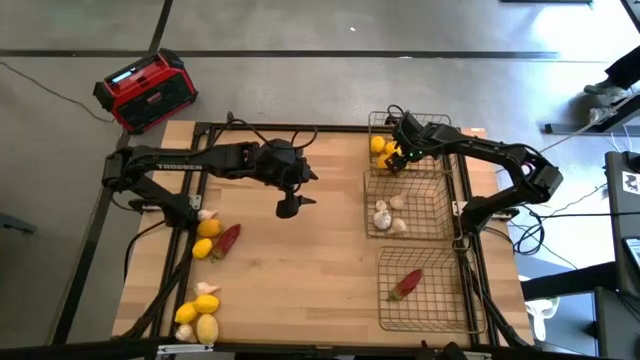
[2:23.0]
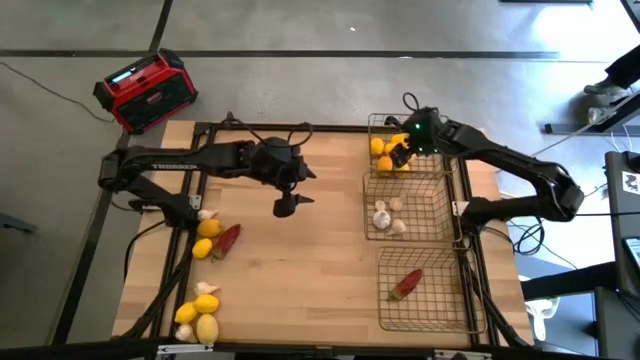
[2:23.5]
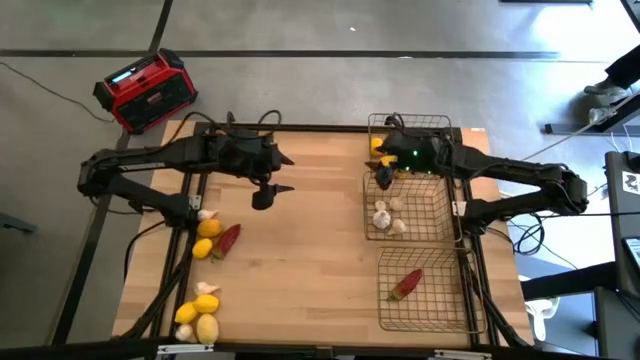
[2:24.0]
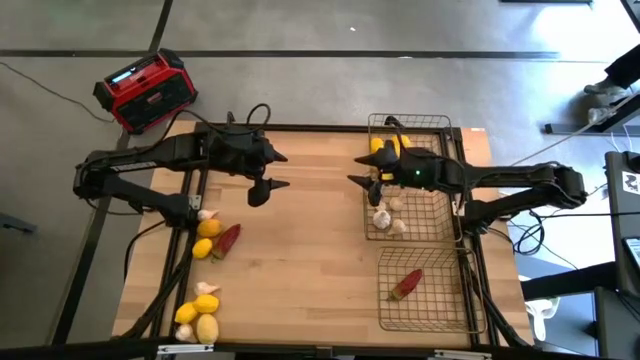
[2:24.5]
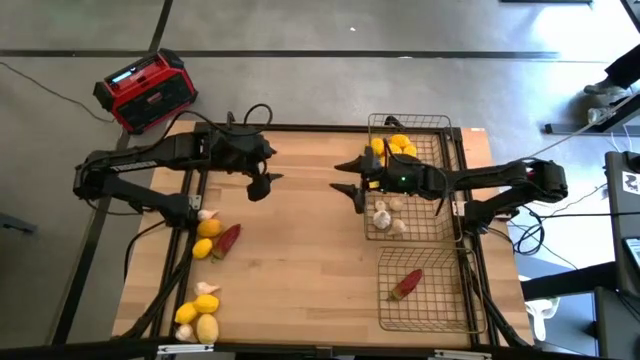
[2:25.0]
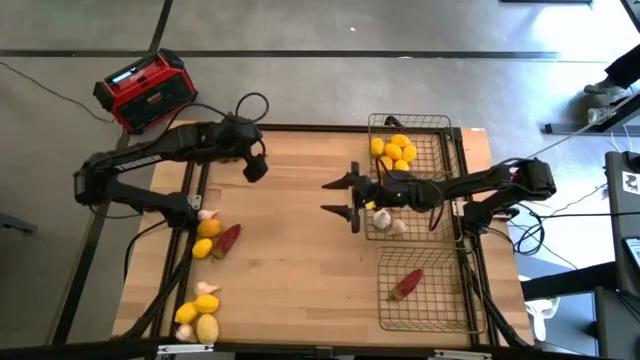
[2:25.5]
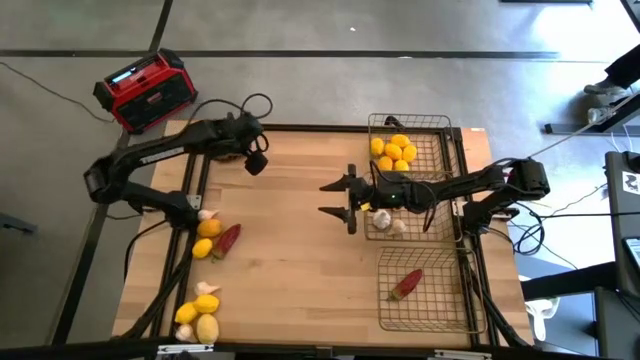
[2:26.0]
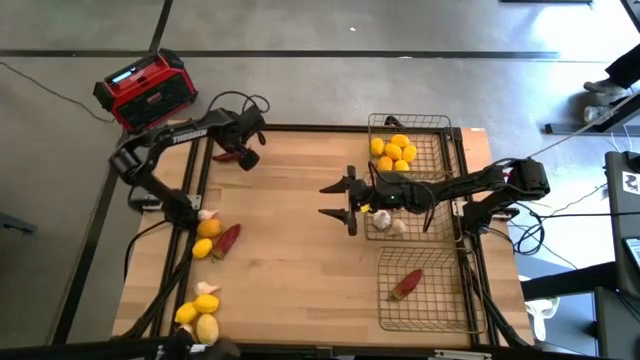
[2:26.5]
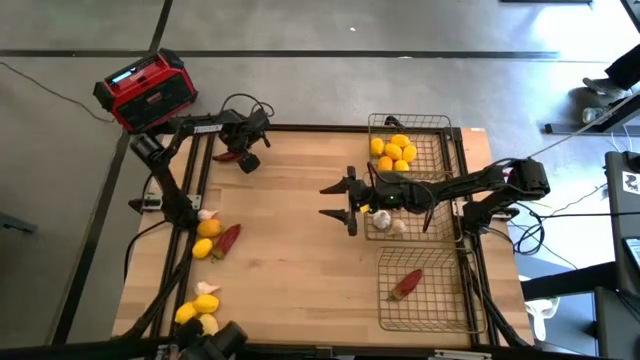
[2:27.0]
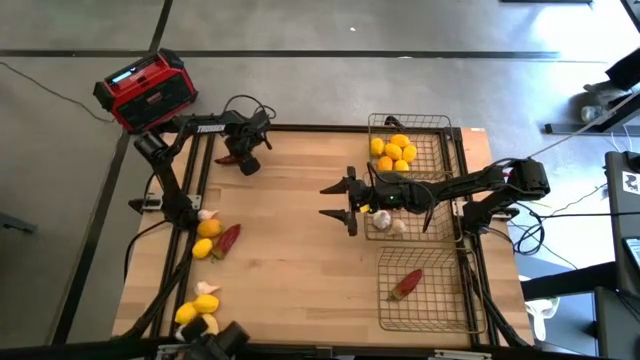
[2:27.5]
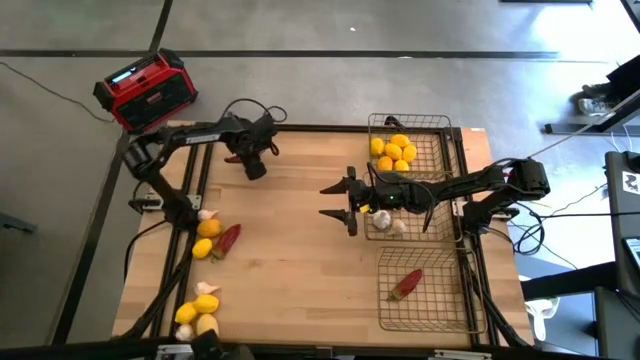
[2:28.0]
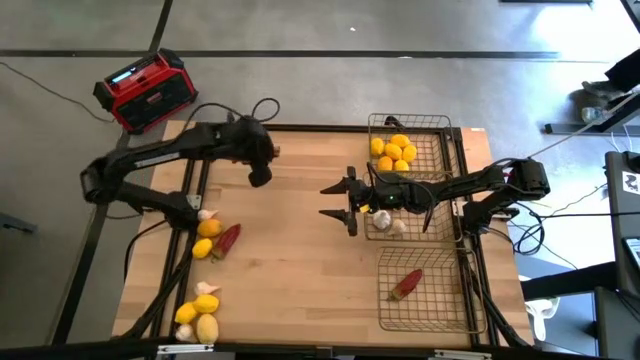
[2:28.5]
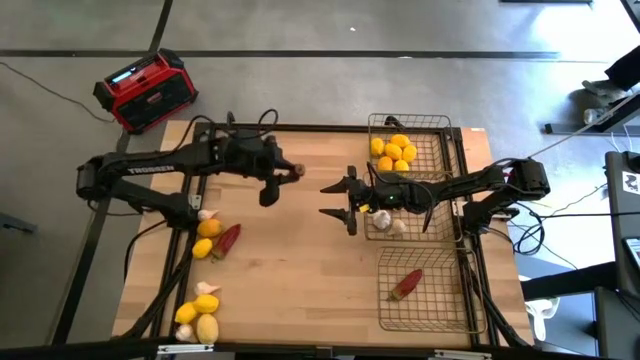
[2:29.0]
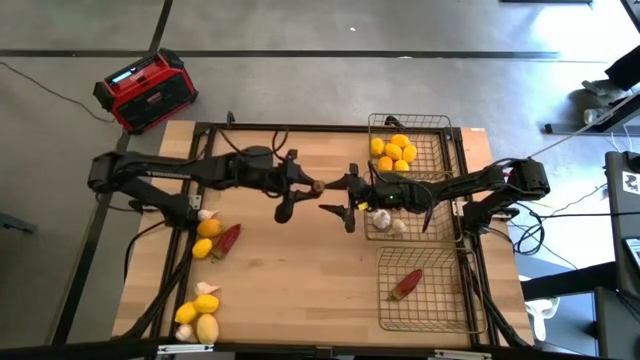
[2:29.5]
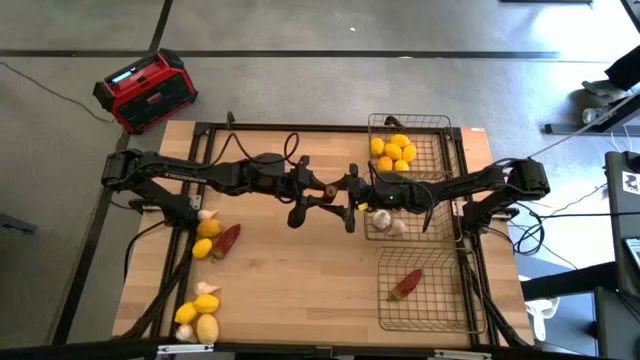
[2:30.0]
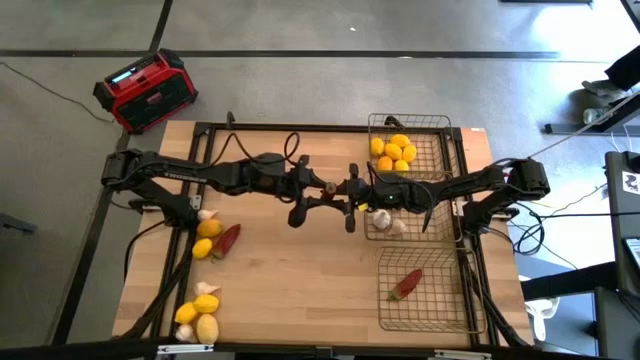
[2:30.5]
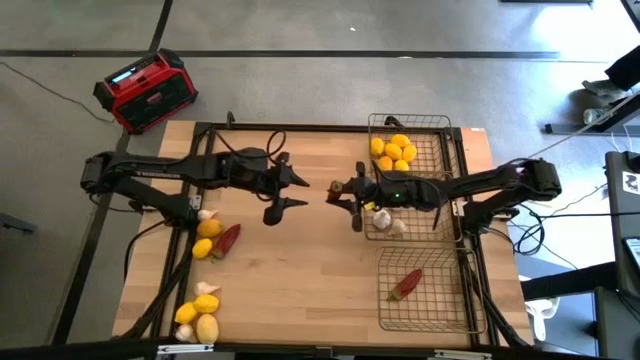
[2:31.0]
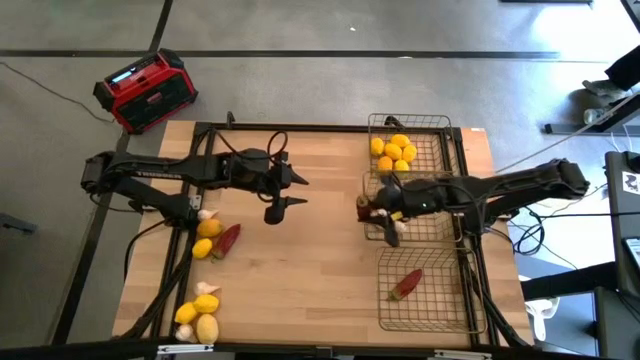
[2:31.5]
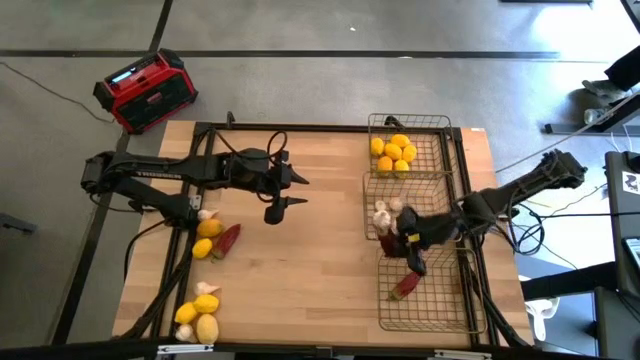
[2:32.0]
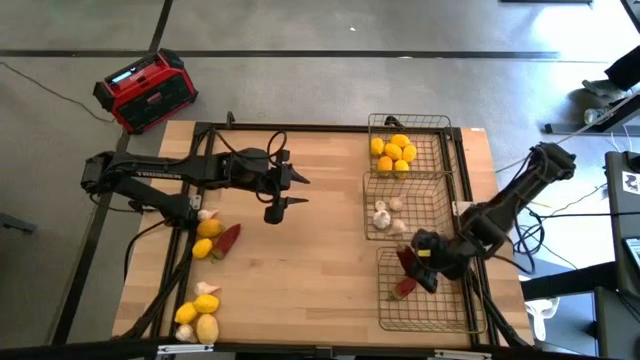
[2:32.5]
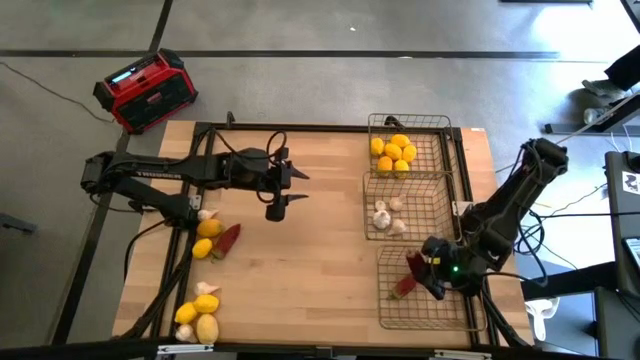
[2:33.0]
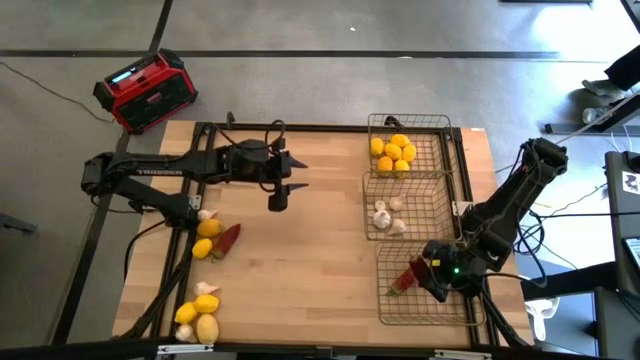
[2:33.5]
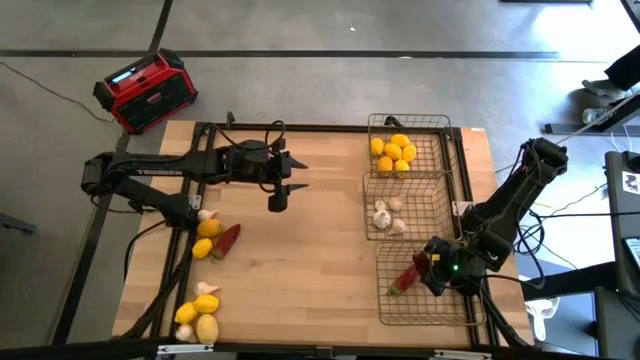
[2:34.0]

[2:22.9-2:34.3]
Task: Sort produce into baskets
Put the red chili pepper into the bottom wire basket

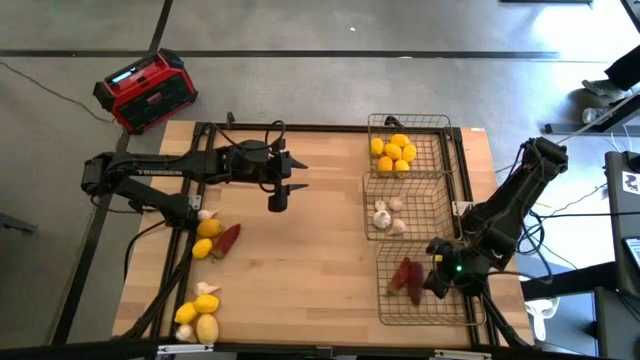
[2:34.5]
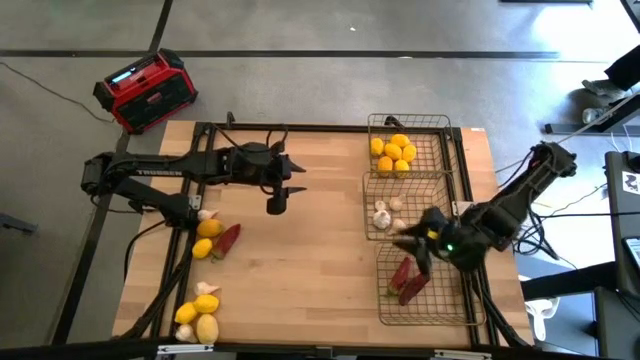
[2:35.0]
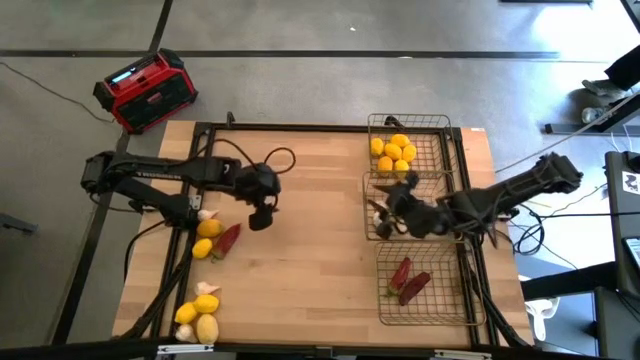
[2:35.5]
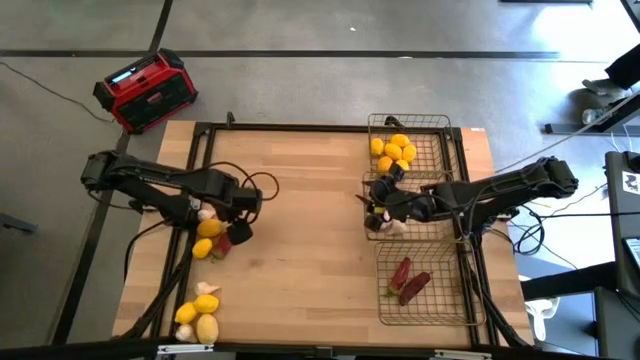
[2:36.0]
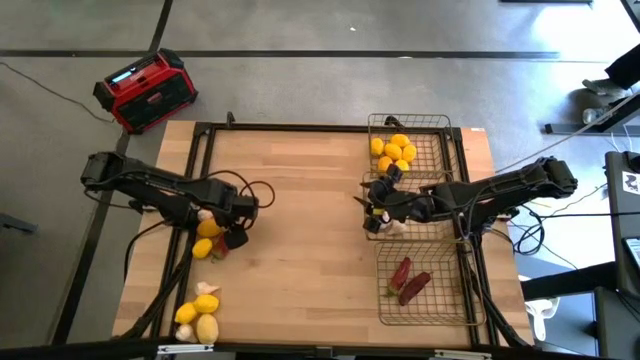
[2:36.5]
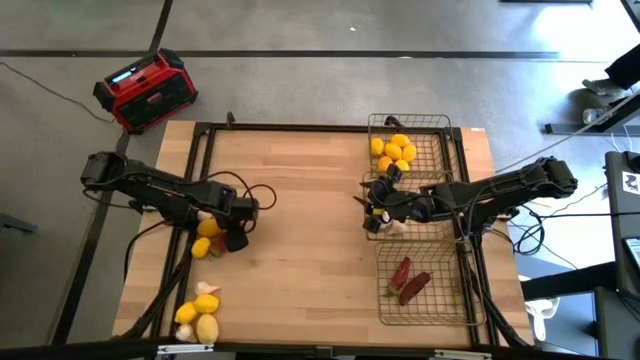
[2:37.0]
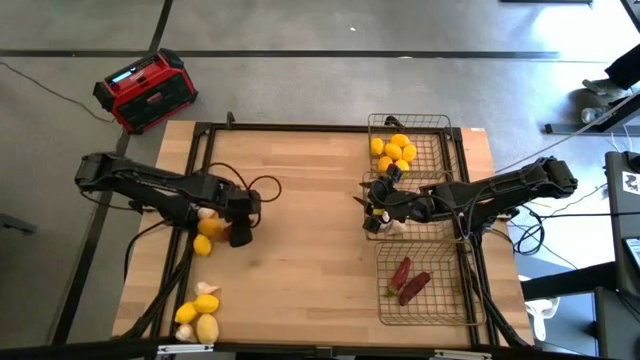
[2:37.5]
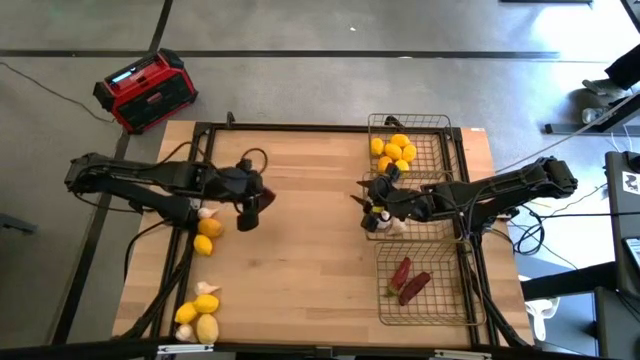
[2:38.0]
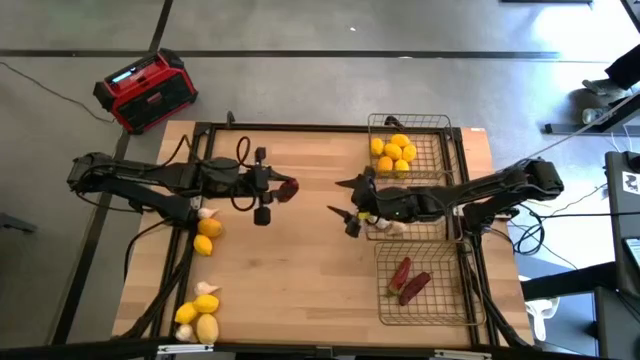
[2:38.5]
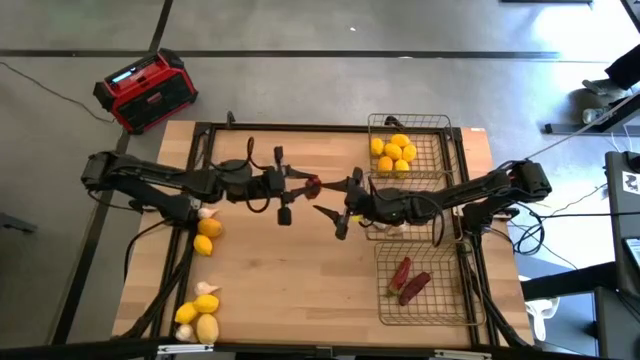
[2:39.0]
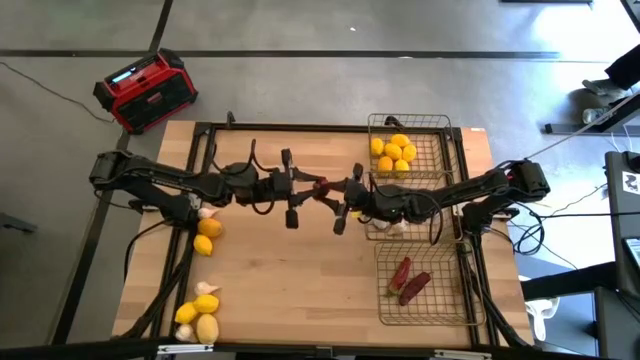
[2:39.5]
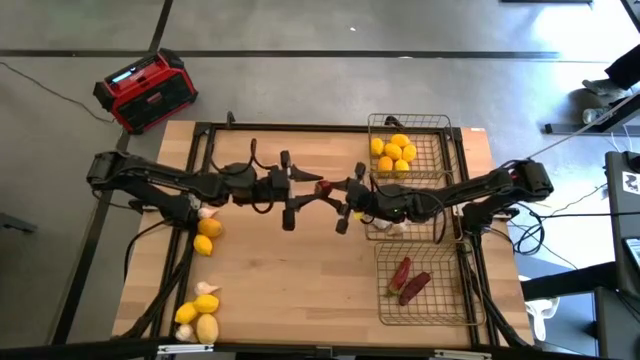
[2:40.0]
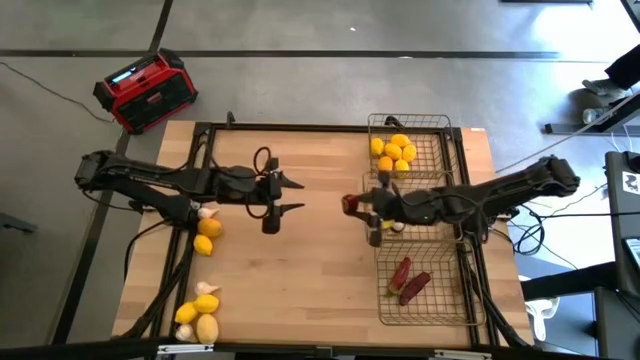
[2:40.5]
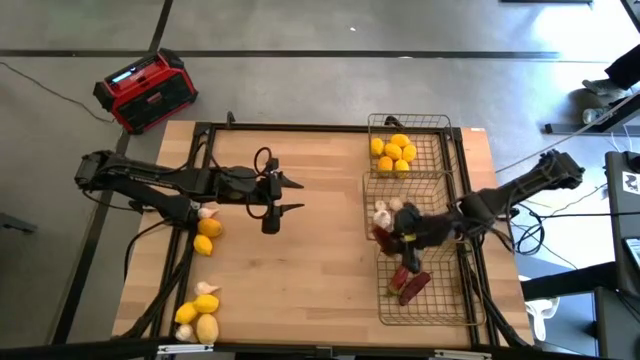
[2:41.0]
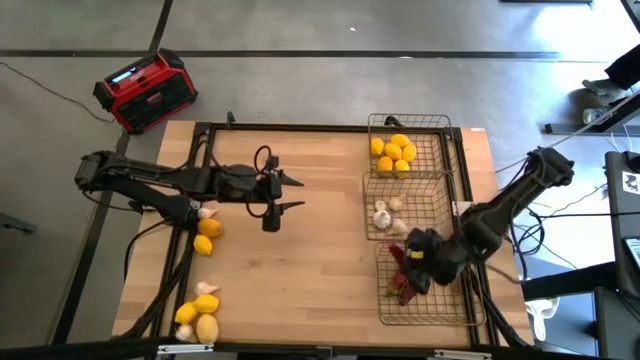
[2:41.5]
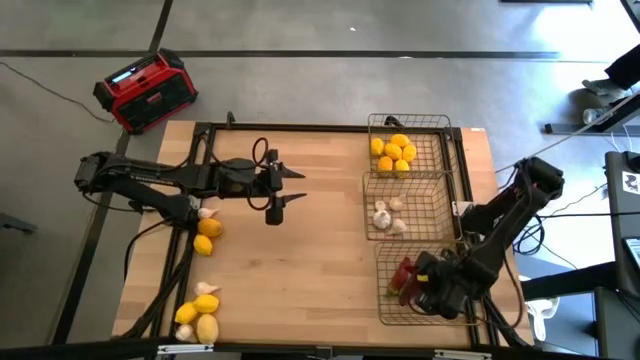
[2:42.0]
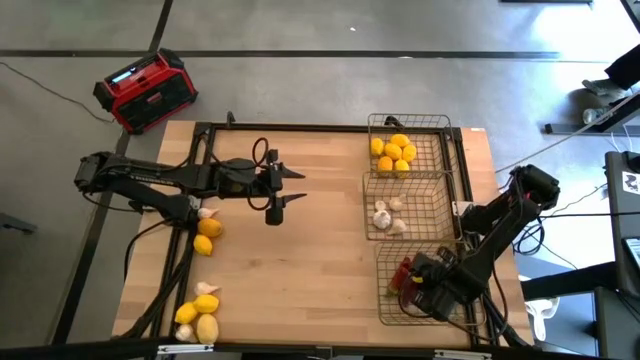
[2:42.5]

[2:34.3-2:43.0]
Put the red chili pepper into the bottom wire basket

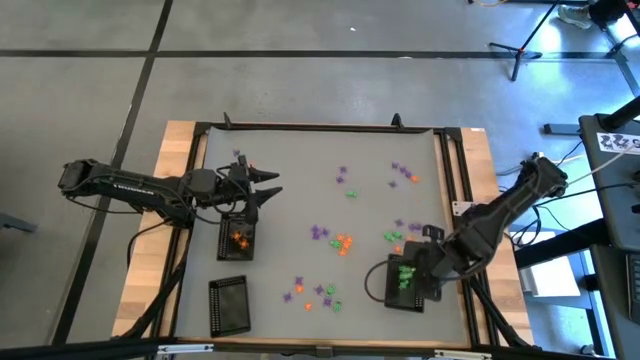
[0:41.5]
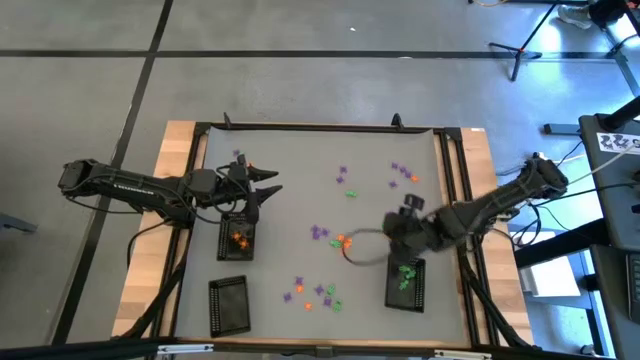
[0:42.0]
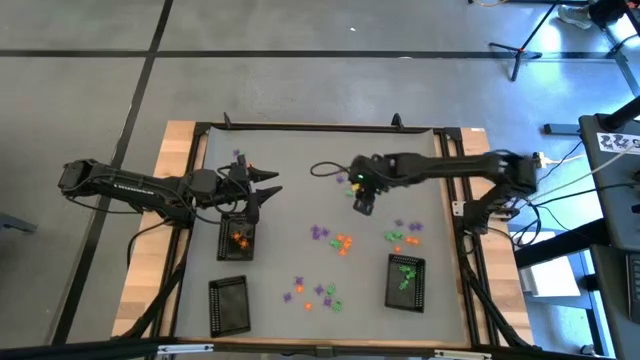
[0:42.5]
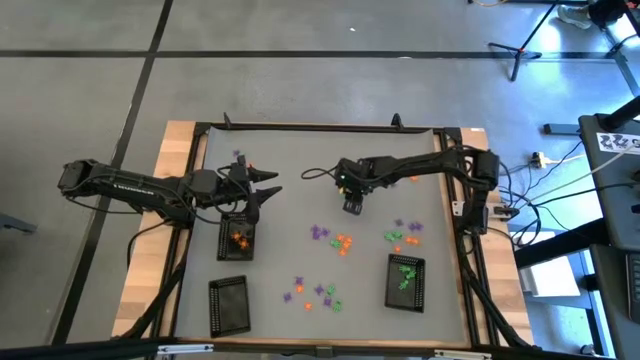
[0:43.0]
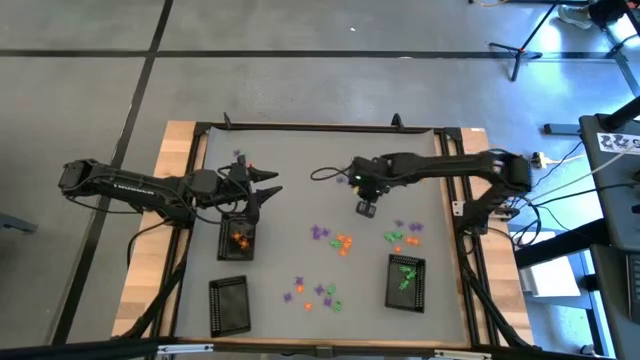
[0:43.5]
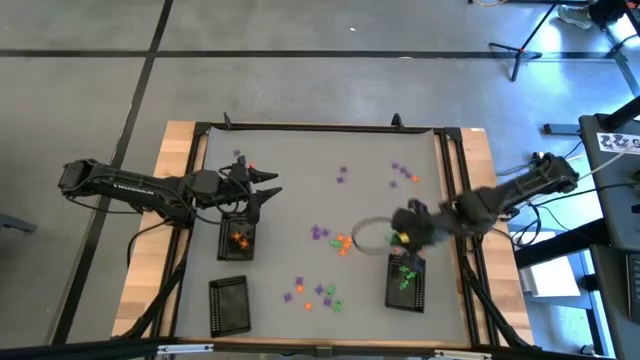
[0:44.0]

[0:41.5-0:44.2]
Task: Sort Halloween decoration
Put the green skeleton toy into the bottom right black basket
